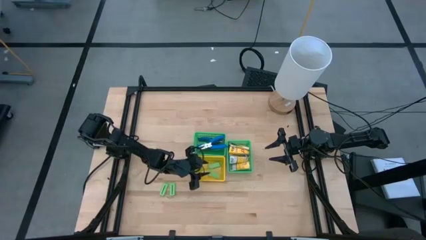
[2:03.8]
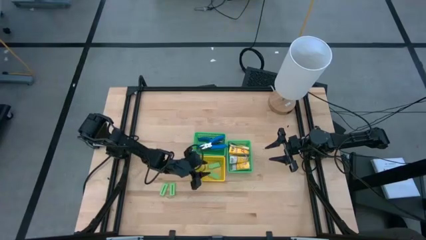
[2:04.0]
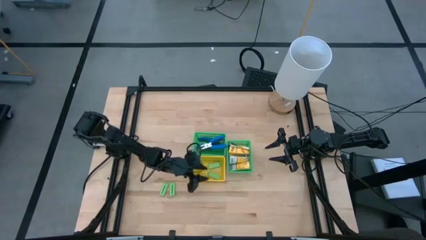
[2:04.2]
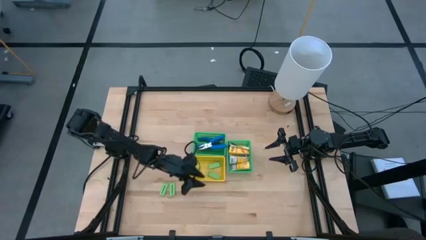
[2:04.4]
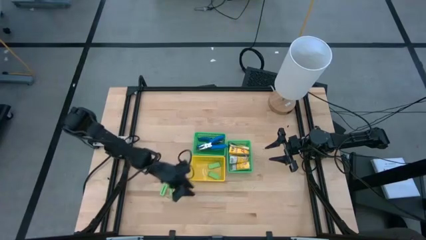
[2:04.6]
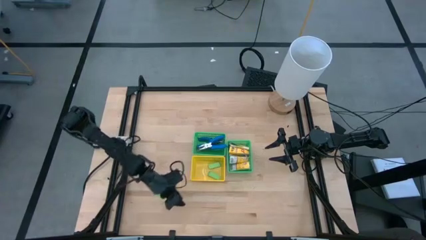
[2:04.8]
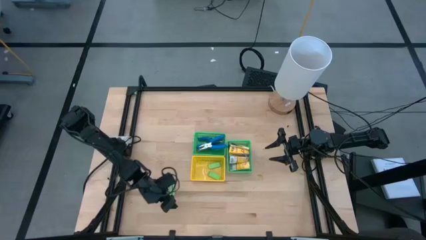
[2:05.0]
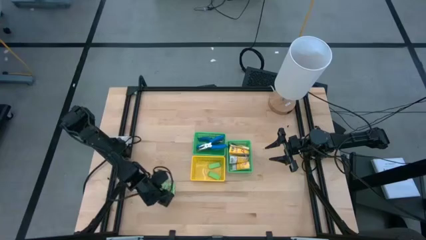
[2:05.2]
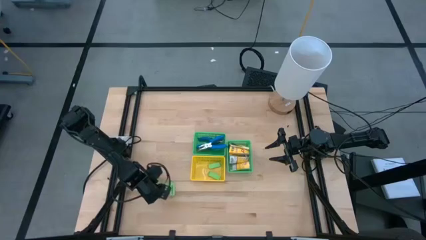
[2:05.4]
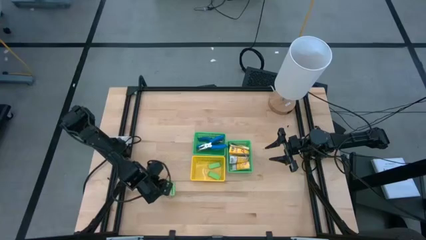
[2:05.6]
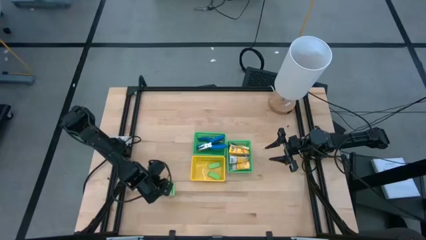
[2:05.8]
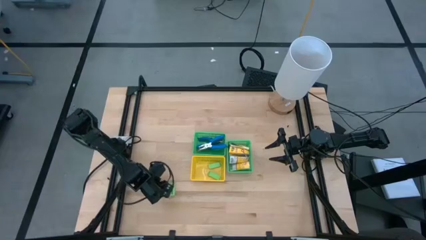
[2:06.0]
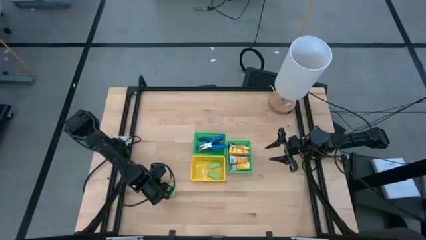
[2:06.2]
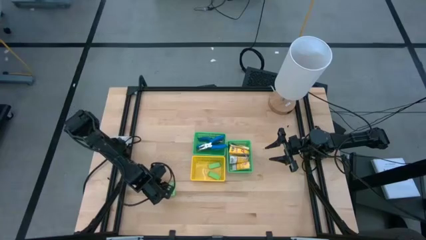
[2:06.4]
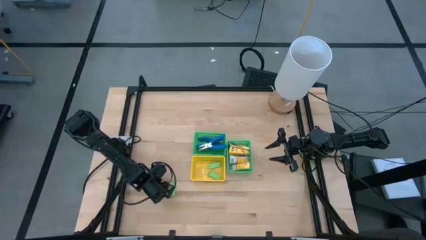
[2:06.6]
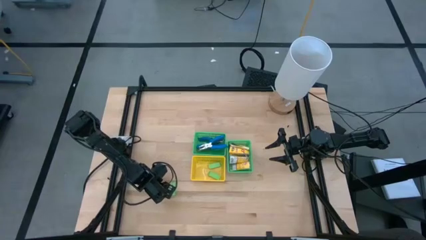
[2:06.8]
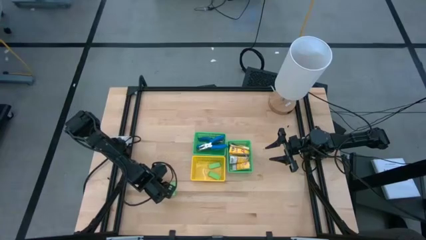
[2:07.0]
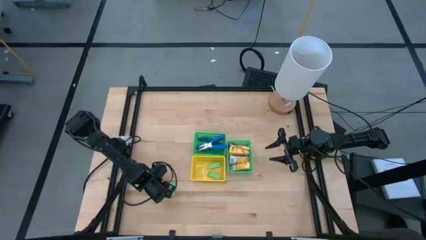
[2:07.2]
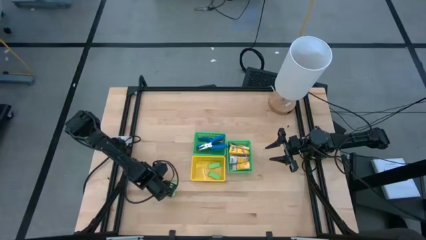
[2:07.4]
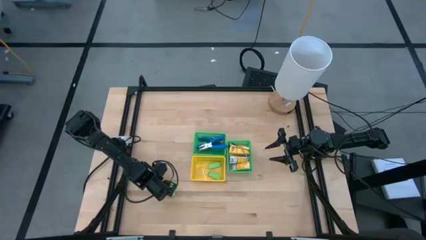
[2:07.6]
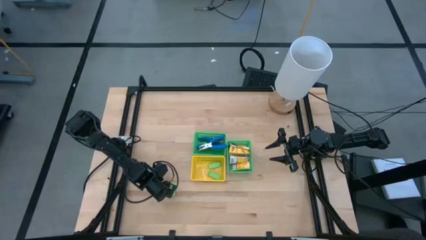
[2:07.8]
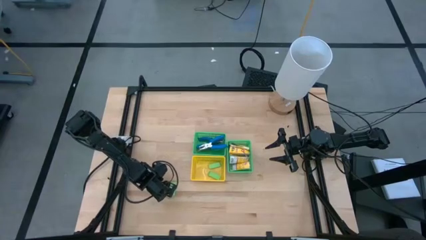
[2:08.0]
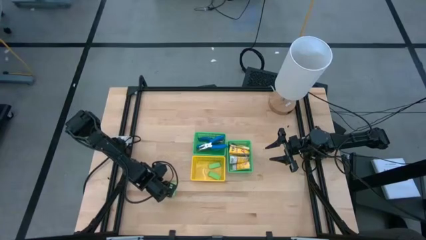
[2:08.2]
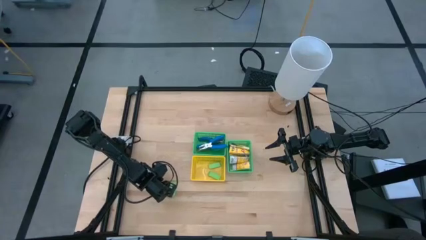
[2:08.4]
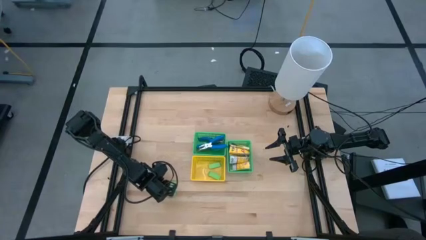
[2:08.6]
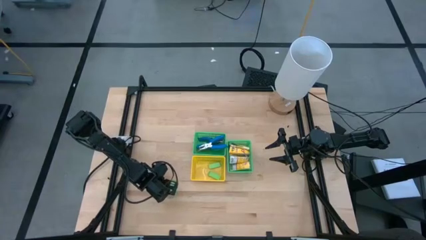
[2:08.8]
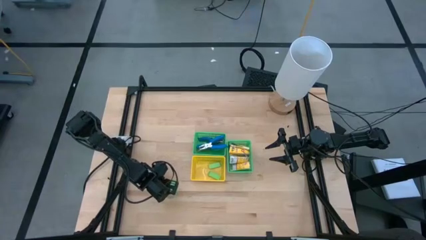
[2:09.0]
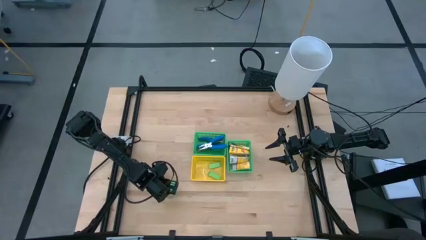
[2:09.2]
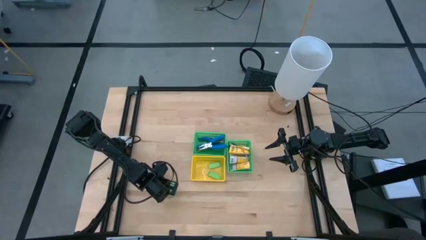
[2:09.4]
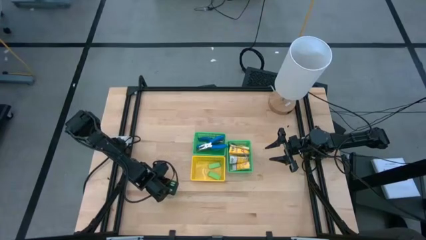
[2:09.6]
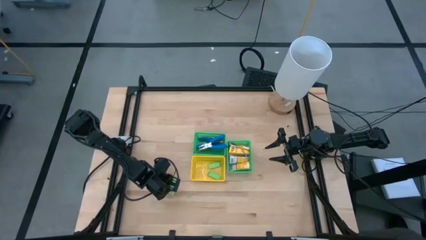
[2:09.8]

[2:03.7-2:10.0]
Task: Pick & Place School Supplies
Put the green eraser into the yellow bin

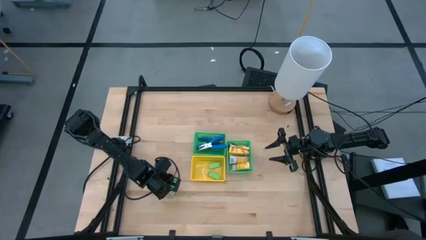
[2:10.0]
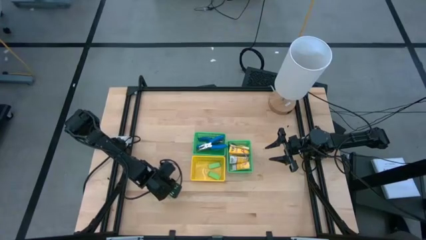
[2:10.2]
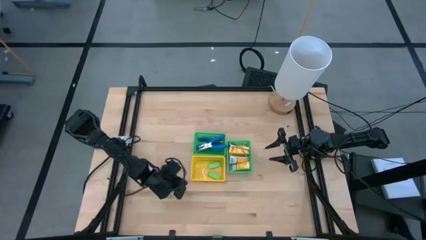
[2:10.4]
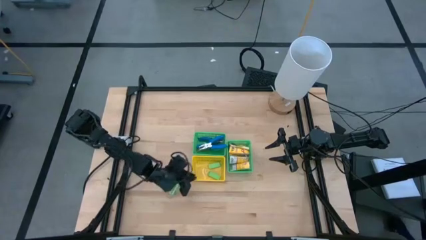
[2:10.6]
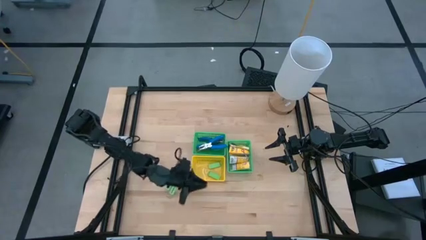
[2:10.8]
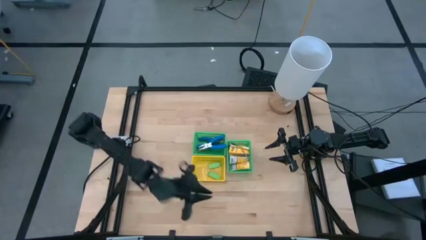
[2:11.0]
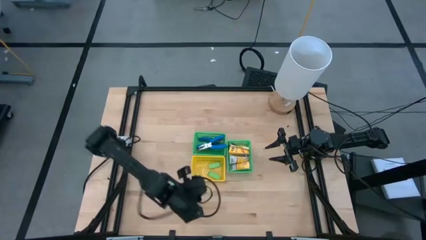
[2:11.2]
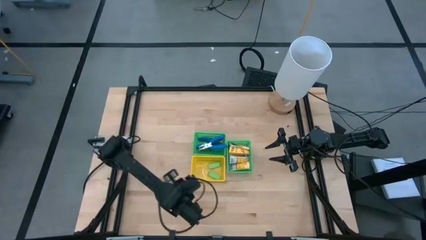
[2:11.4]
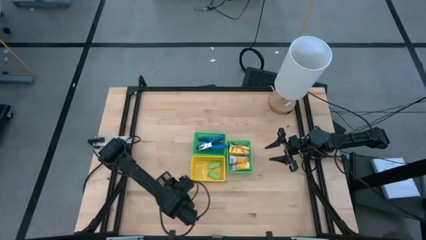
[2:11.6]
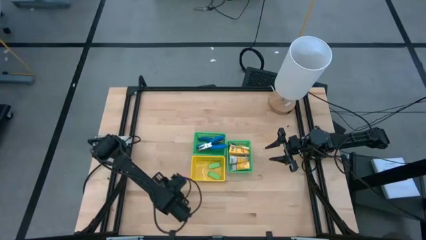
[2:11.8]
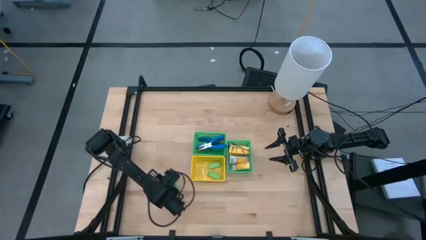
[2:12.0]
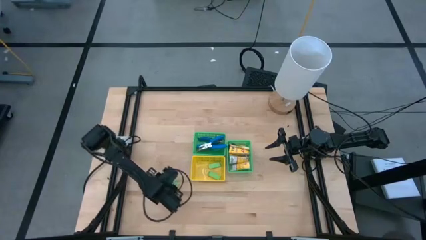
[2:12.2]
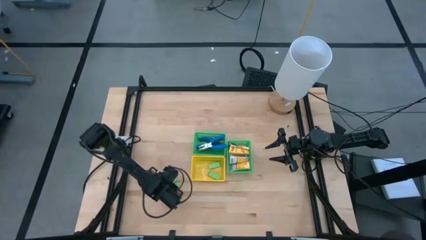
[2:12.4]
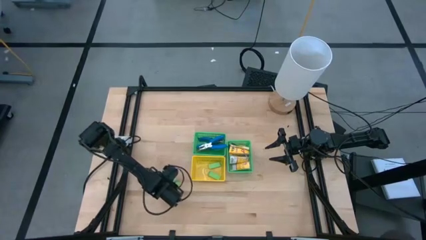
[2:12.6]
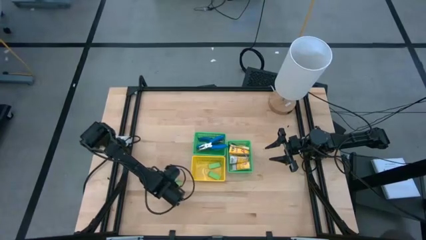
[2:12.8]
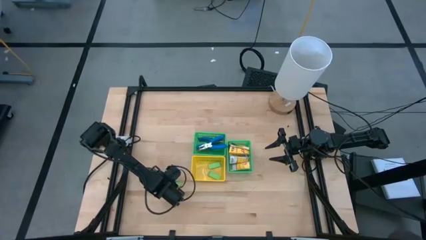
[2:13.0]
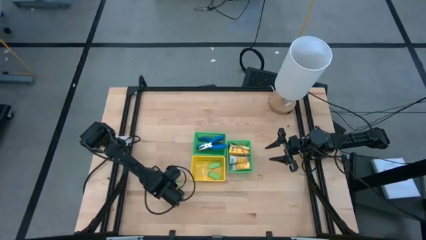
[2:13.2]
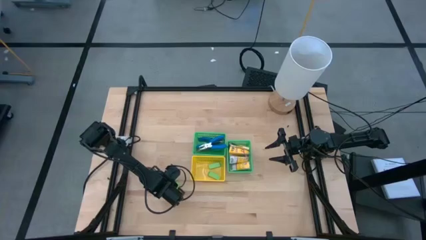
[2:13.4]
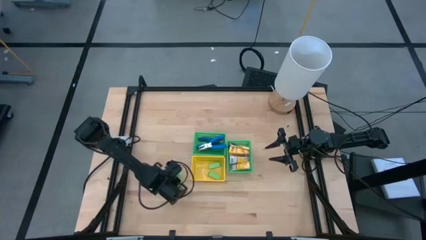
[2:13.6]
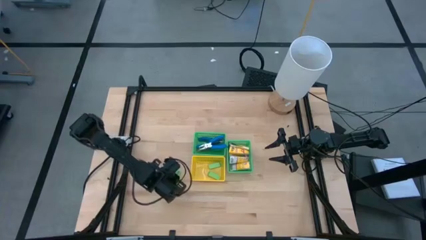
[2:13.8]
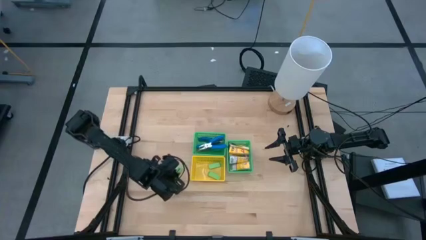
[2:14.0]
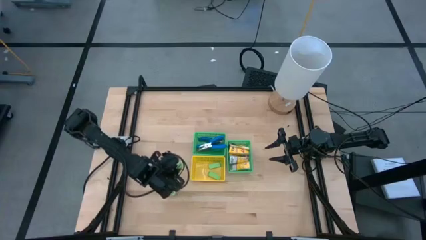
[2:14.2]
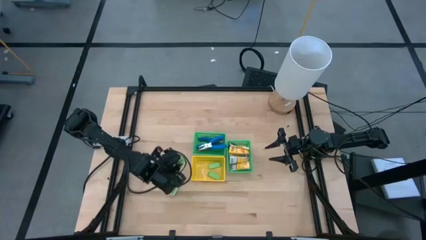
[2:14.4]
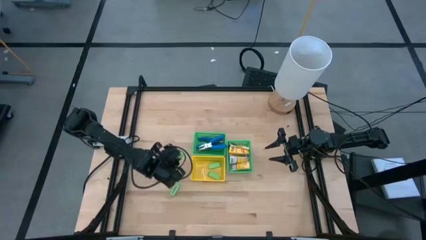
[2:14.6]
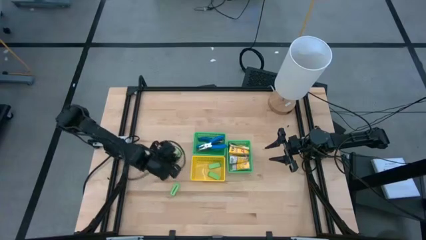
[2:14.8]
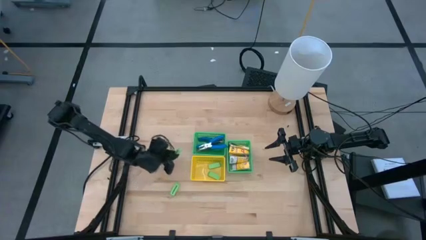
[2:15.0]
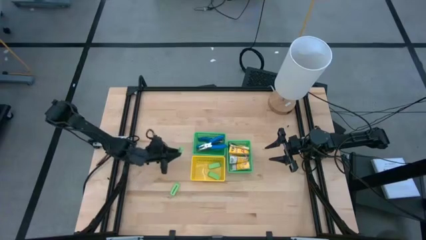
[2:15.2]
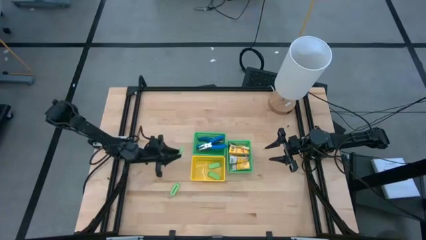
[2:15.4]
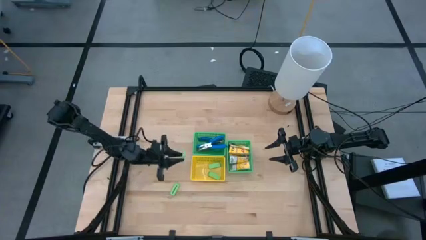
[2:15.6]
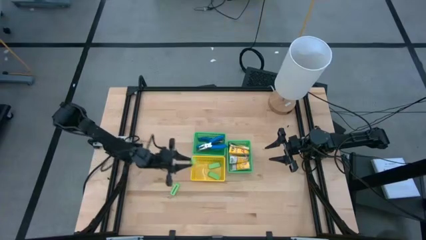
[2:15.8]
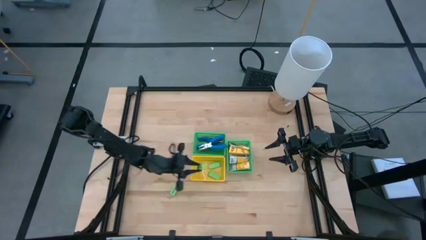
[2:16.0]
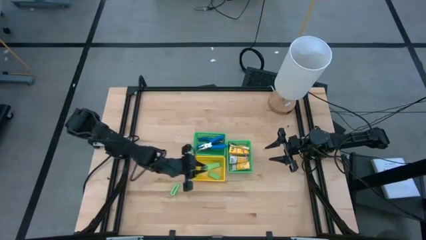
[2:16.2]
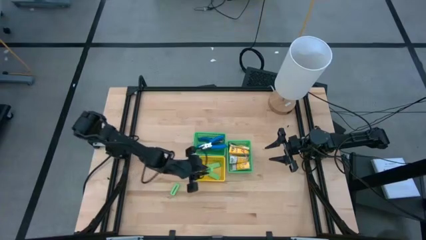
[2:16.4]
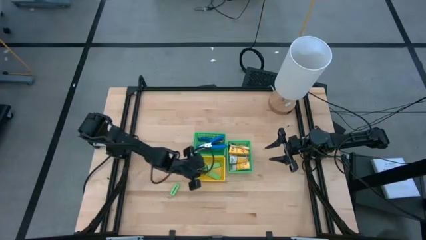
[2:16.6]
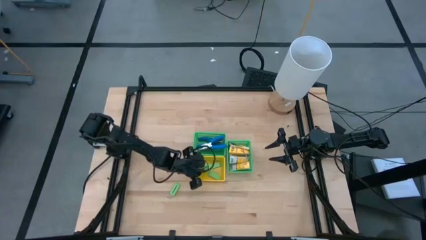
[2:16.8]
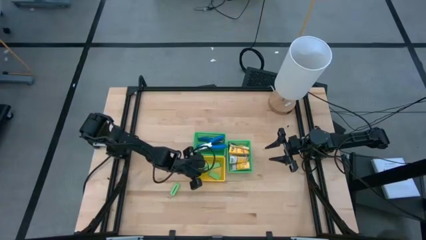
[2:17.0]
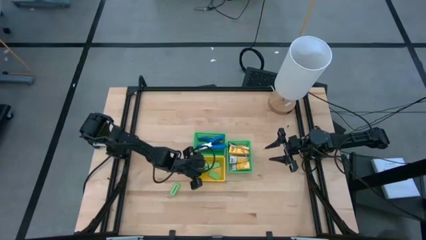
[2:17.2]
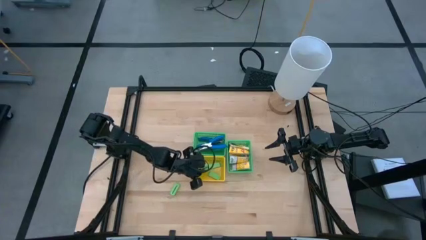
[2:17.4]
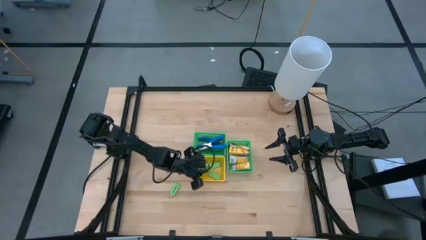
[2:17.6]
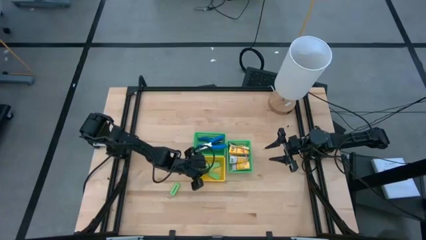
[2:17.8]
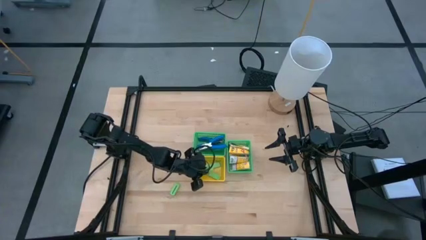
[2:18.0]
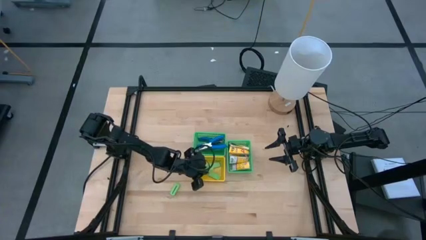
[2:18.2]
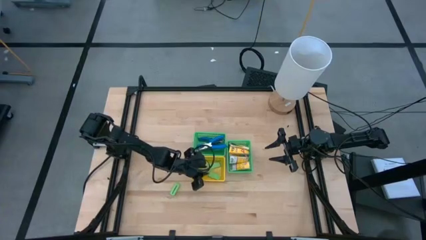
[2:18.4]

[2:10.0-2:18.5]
Put the green eraser into the yellow bin
